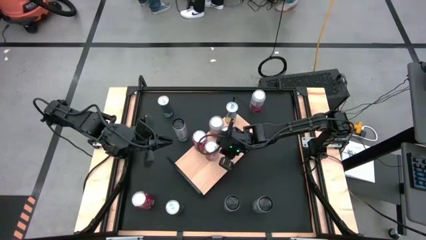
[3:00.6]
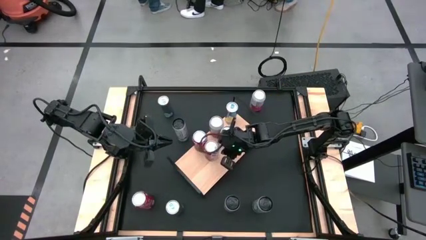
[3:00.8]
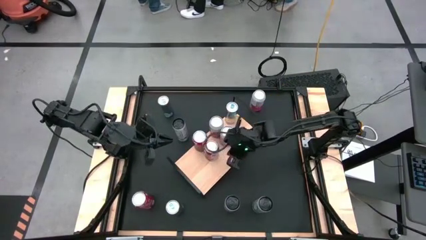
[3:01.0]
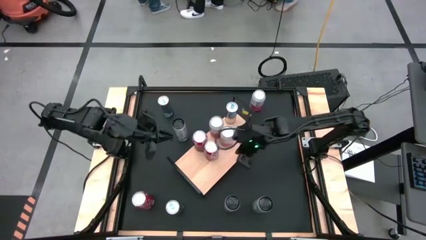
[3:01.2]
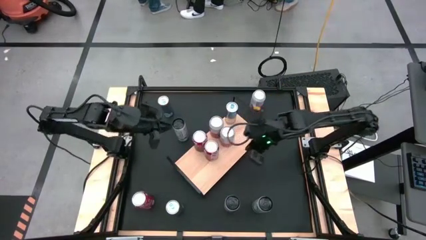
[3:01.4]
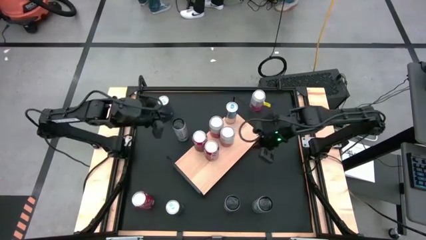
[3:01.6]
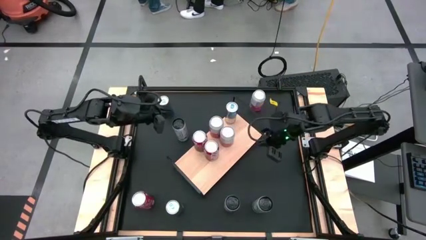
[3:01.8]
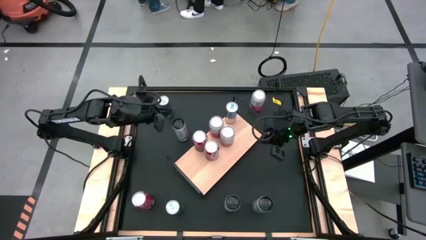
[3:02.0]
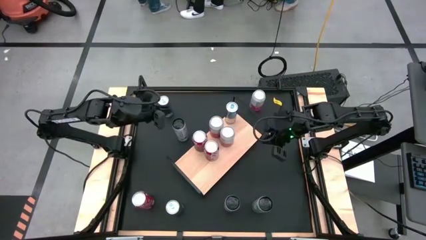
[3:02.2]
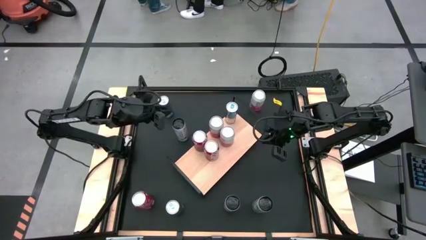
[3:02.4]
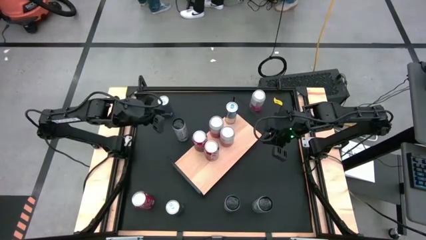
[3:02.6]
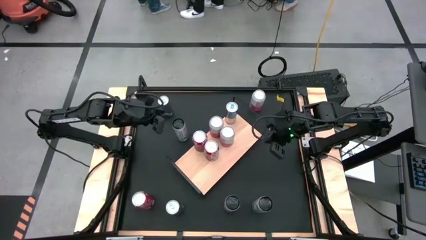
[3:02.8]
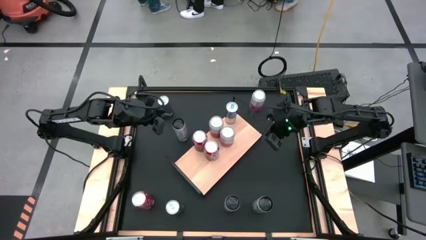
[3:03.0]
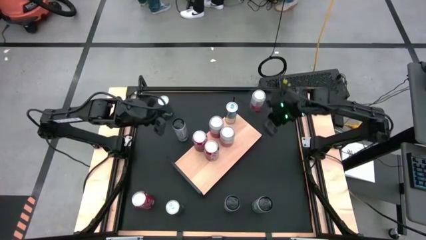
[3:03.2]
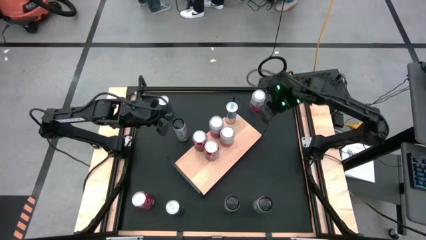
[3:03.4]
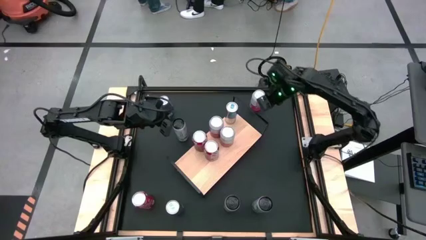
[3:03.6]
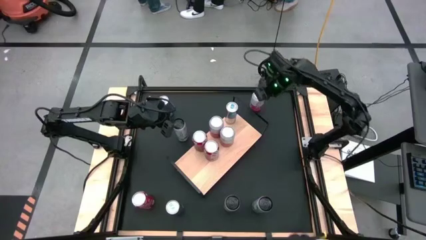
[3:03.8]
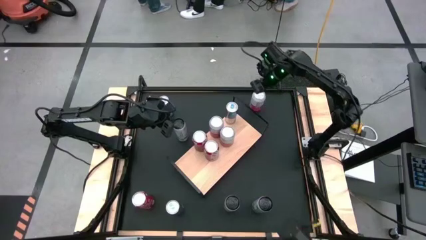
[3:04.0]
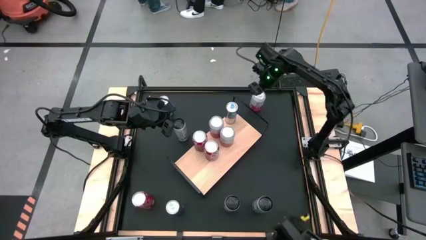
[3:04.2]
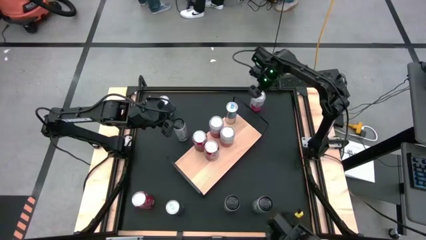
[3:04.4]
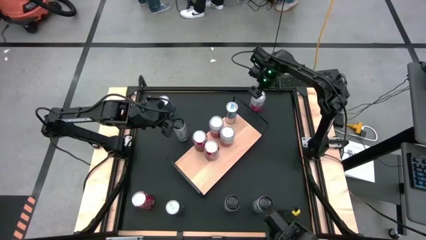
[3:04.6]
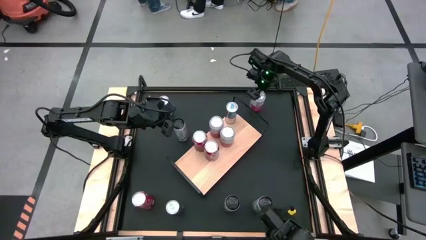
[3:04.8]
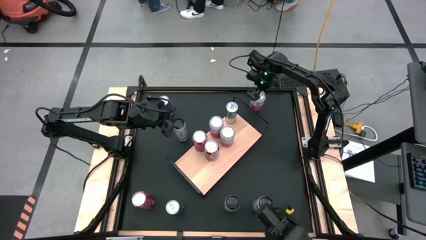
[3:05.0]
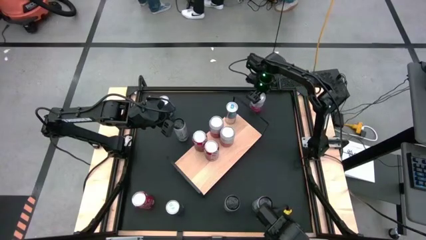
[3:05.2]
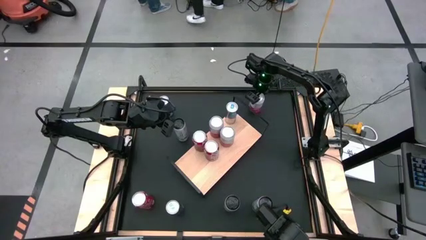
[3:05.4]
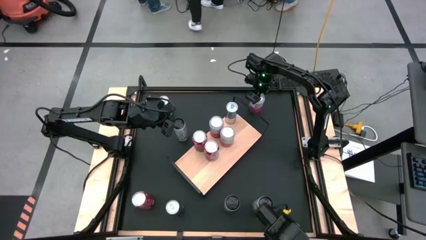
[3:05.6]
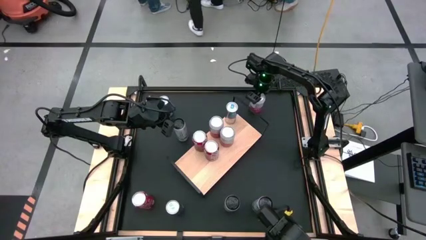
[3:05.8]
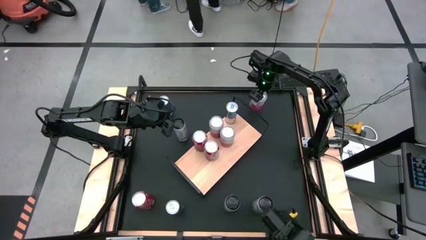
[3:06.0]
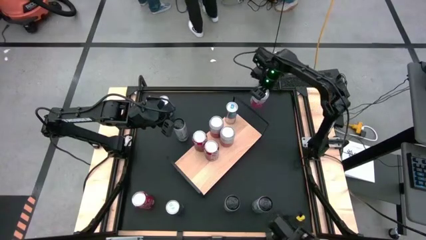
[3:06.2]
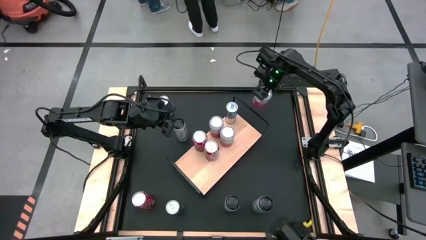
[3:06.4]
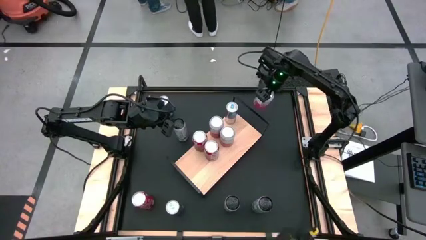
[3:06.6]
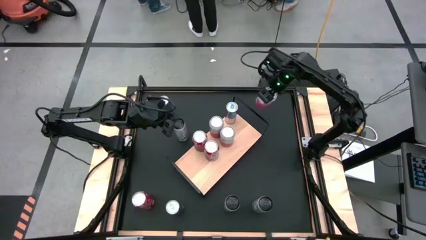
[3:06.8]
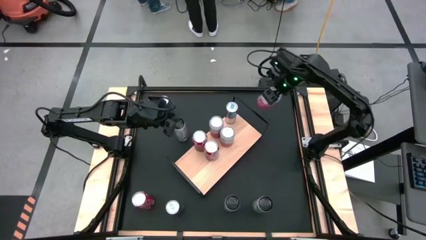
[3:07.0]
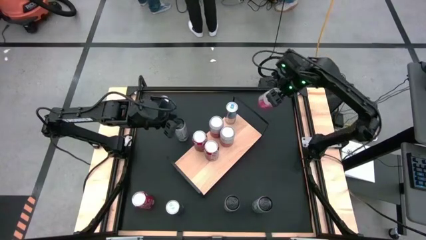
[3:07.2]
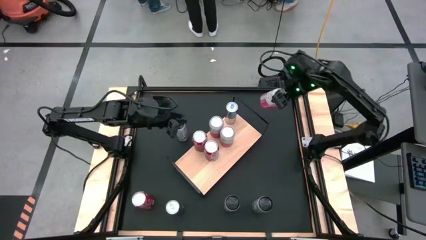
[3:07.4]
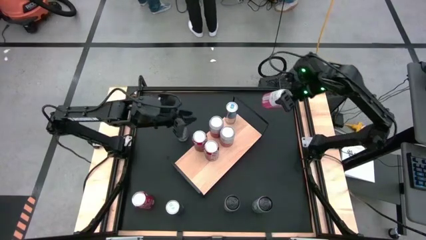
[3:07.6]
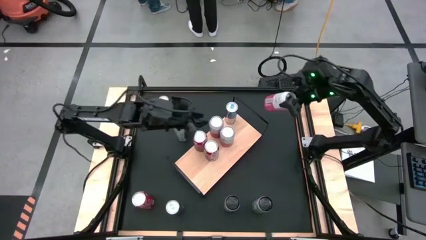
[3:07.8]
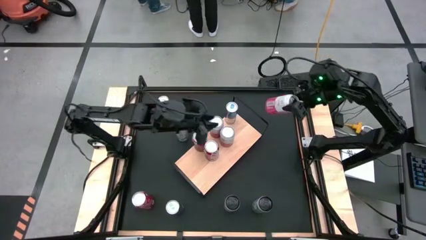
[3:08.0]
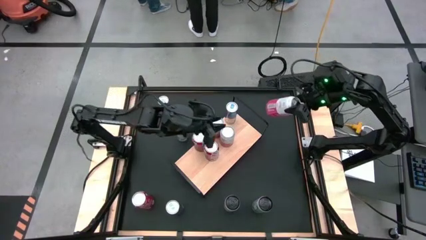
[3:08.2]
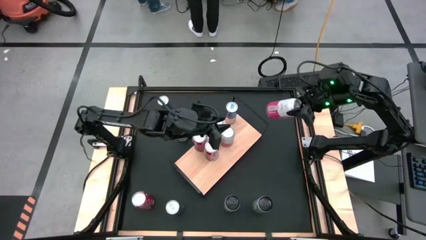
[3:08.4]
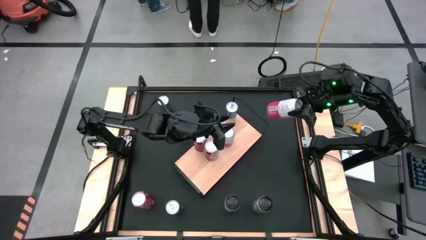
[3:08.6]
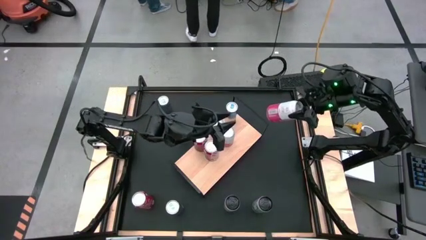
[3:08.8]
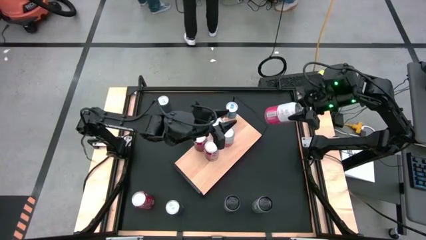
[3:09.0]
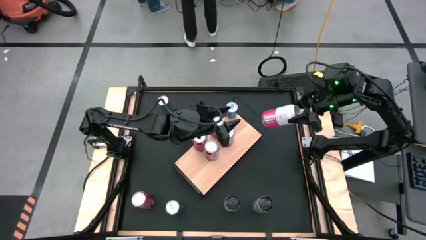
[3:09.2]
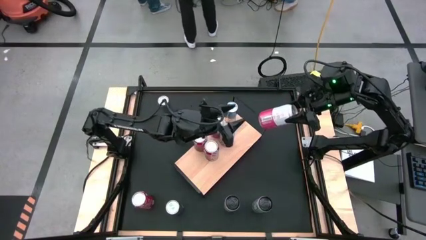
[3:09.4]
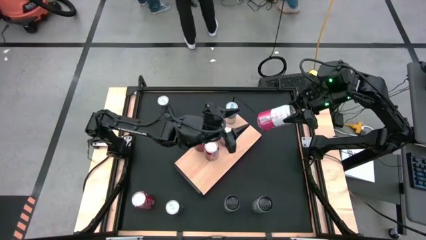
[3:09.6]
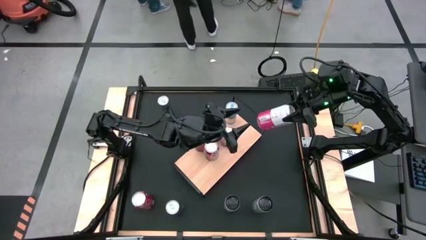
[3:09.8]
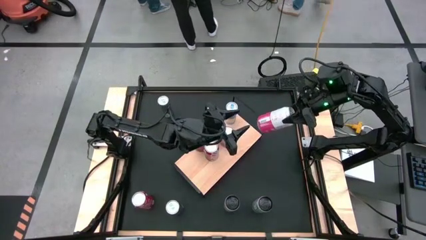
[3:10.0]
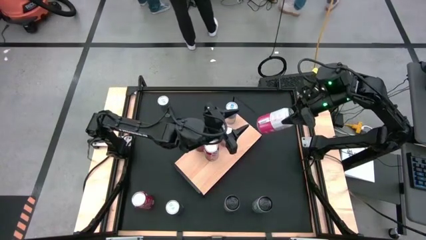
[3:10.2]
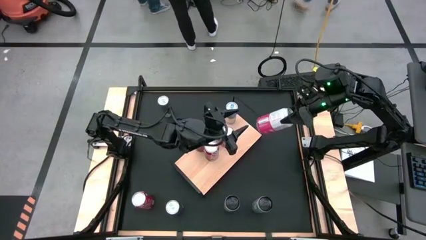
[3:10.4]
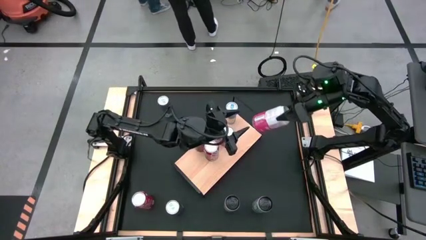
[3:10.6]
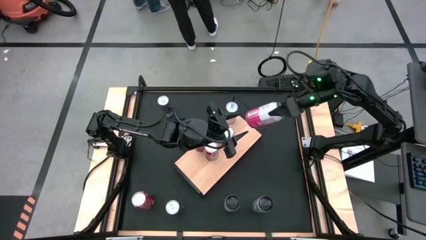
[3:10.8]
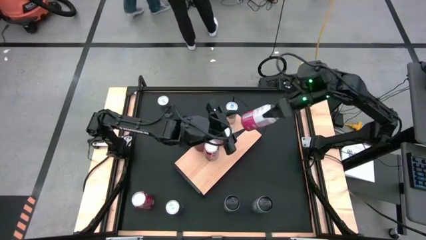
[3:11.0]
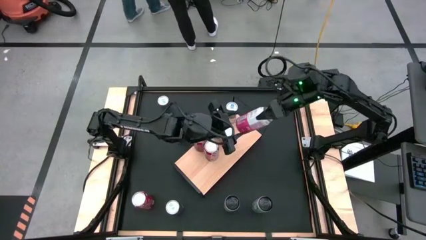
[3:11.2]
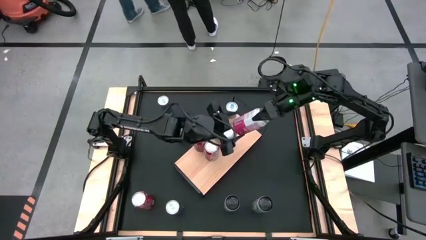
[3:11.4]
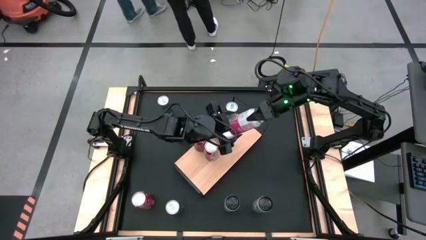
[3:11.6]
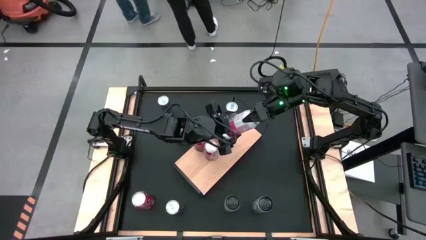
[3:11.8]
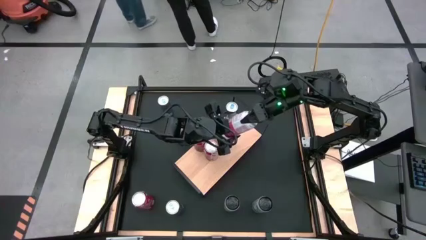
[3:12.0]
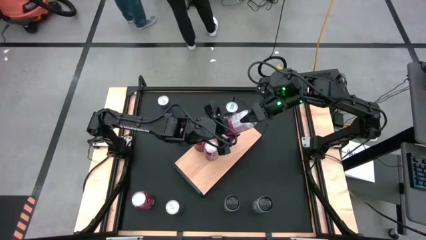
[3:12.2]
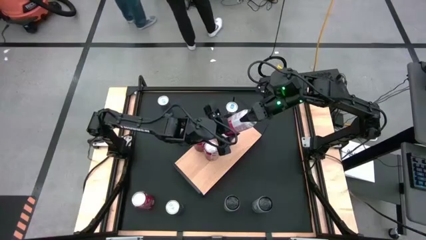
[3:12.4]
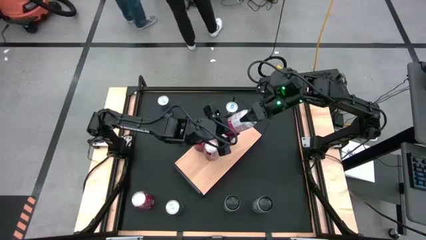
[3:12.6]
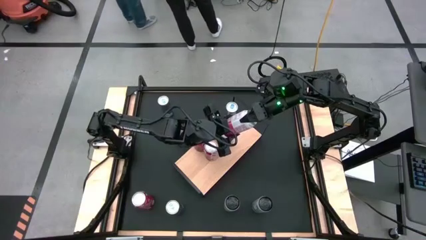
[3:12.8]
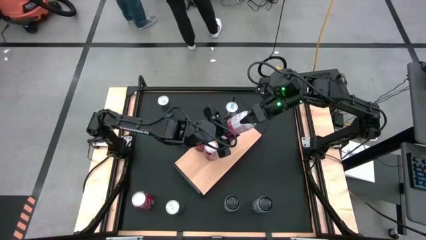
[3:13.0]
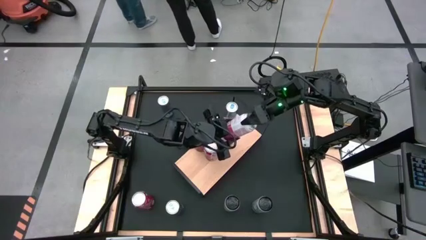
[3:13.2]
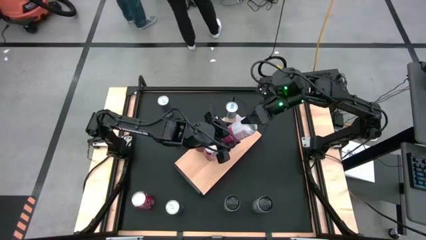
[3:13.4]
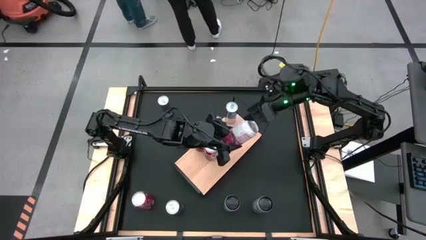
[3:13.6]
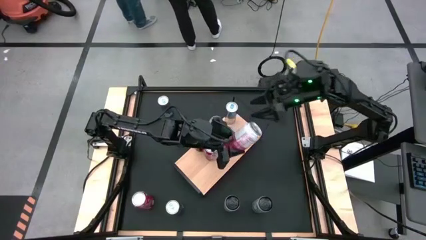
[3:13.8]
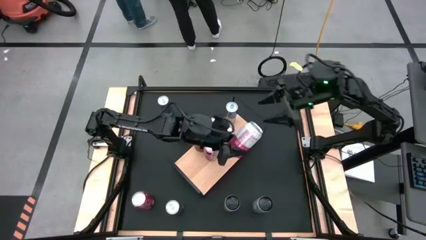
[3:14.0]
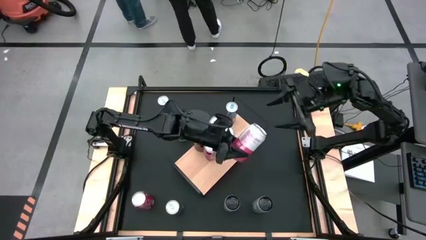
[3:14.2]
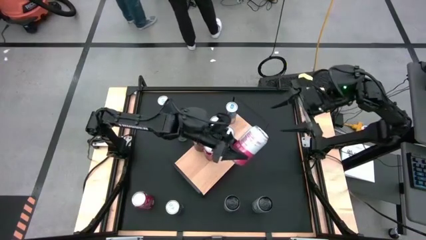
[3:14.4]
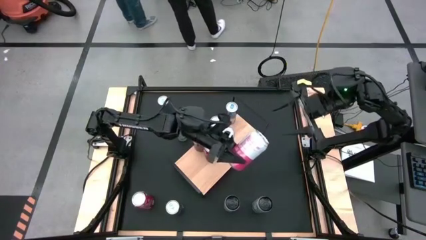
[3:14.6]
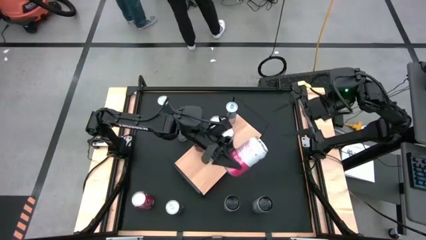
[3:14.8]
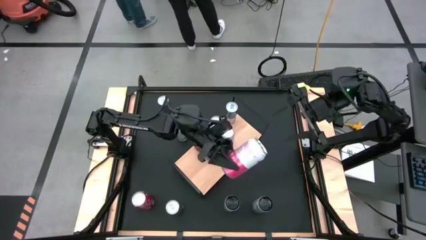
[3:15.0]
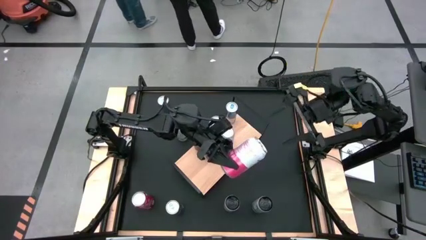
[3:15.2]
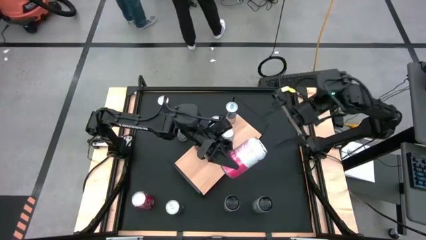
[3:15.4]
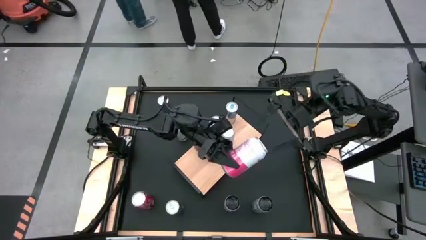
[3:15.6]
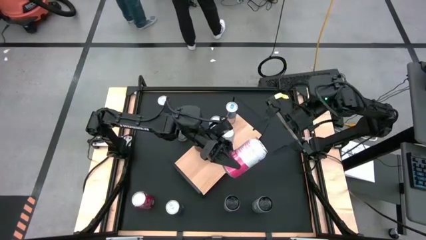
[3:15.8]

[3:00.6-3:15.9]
Task: Place canned beverage on shelf
Put the pink white soda can on the shelf aligned with the other pink white soda cans
